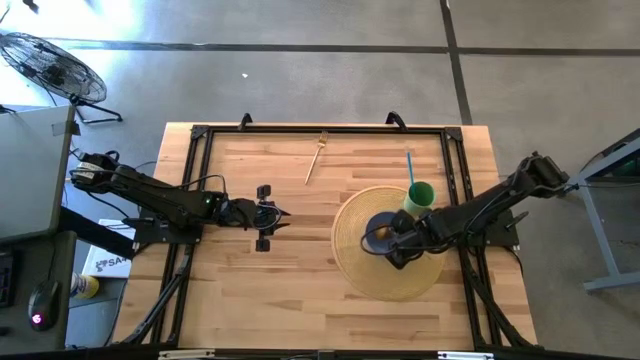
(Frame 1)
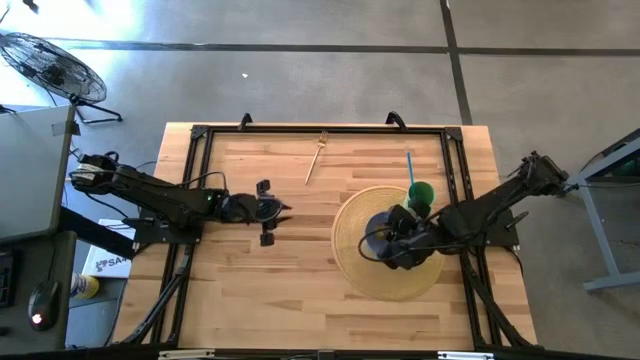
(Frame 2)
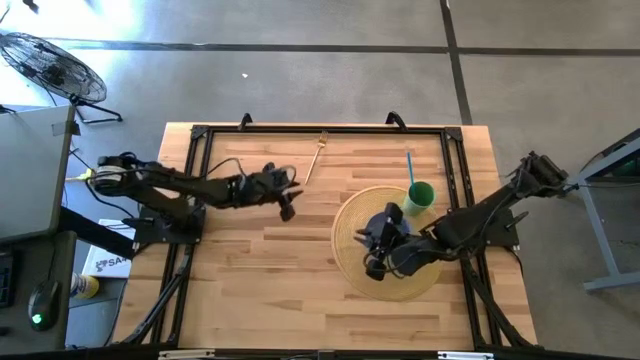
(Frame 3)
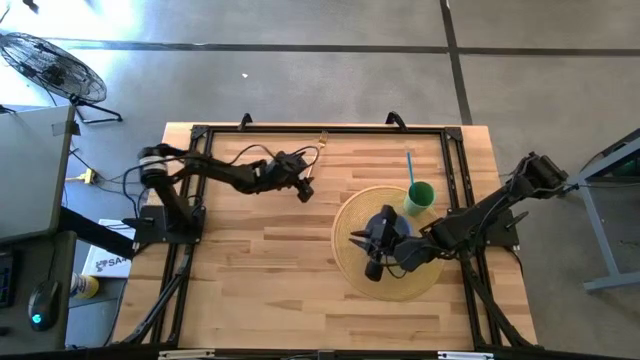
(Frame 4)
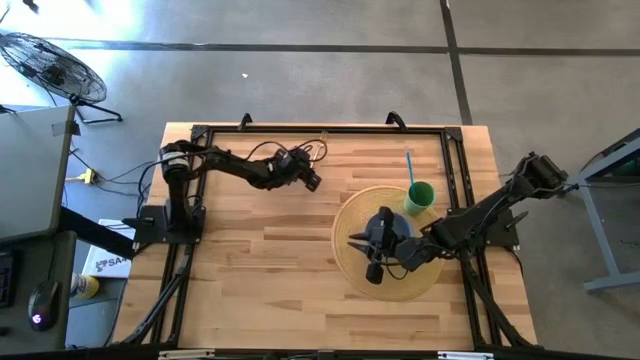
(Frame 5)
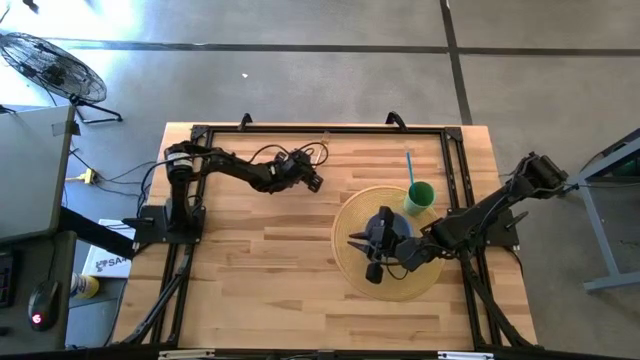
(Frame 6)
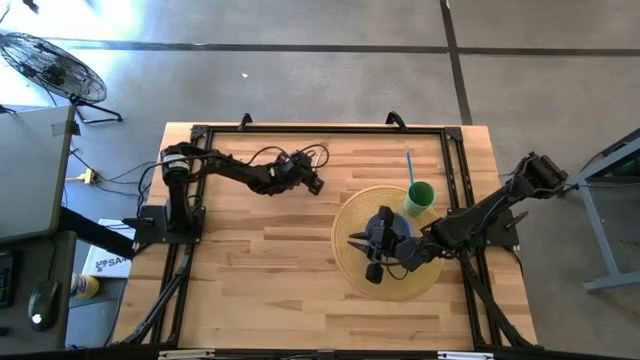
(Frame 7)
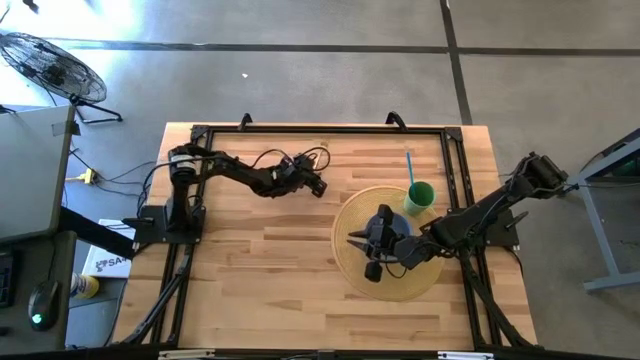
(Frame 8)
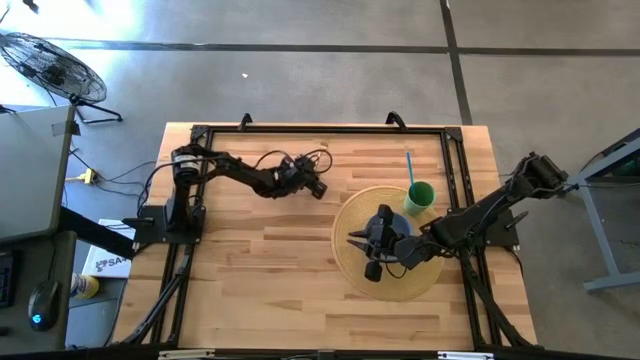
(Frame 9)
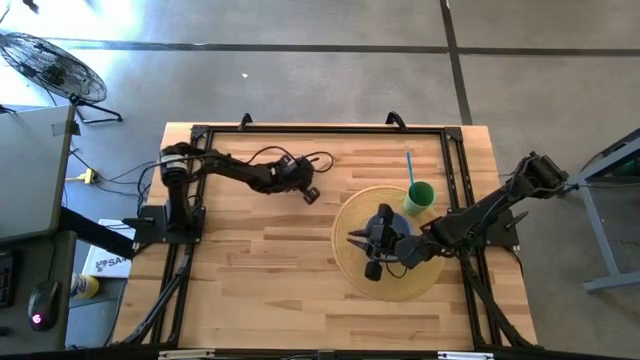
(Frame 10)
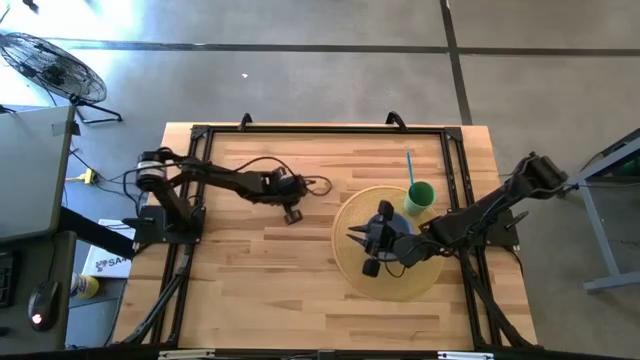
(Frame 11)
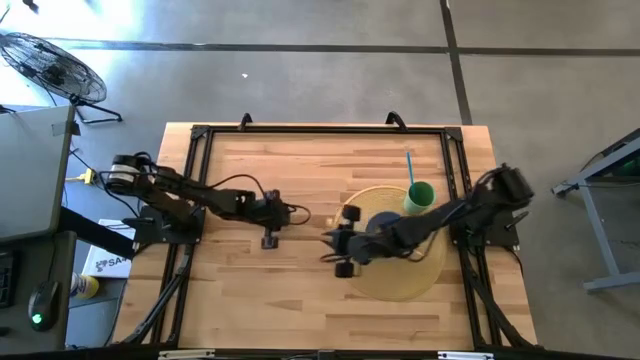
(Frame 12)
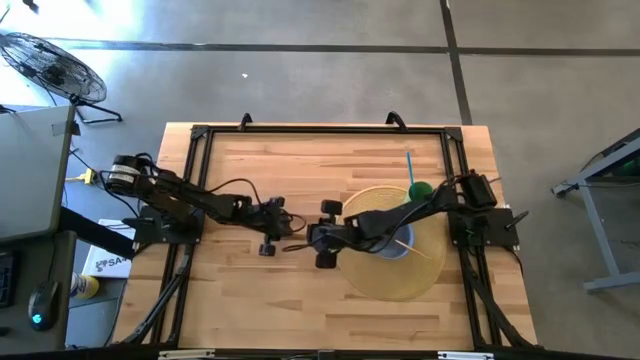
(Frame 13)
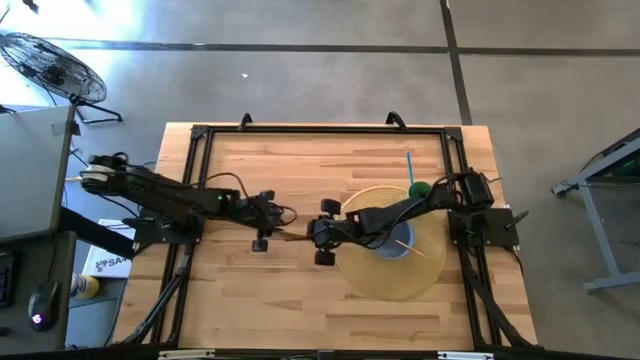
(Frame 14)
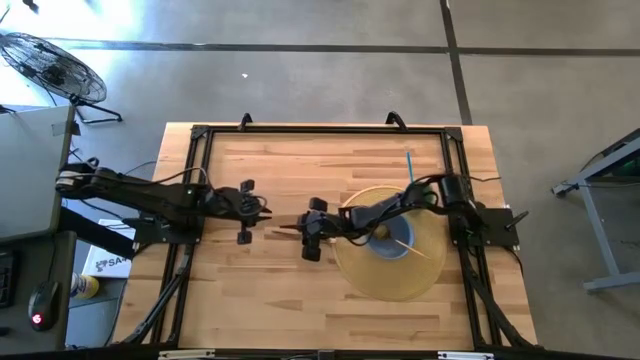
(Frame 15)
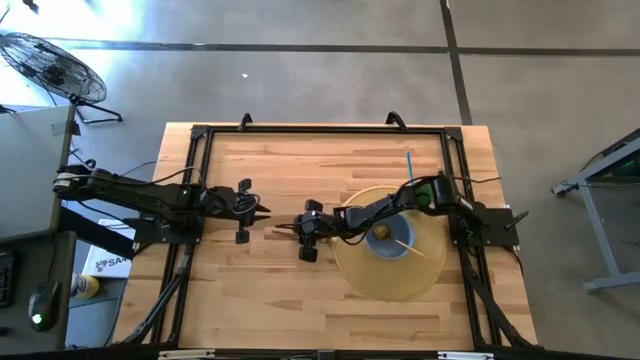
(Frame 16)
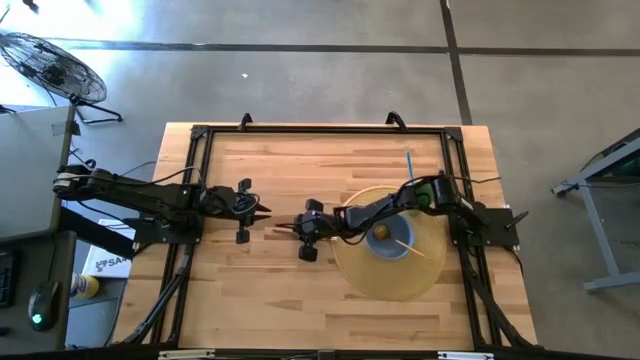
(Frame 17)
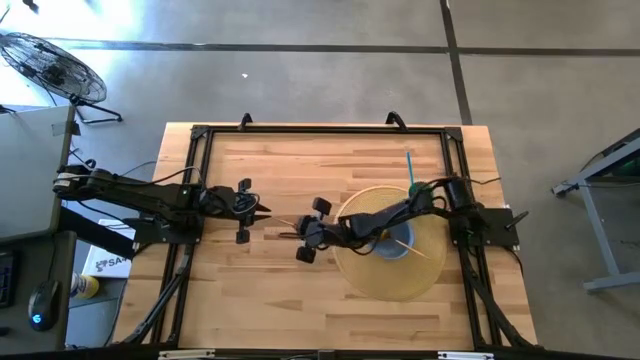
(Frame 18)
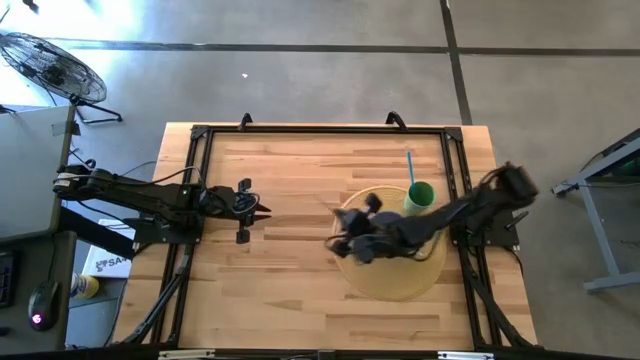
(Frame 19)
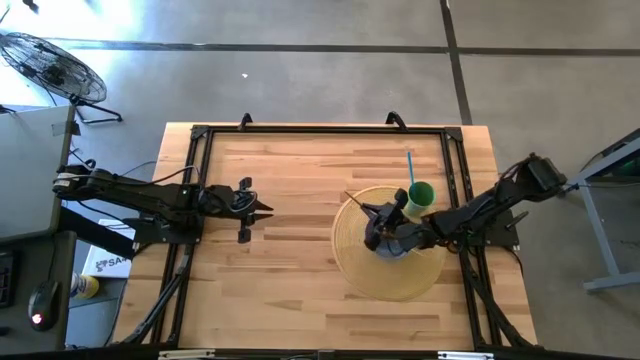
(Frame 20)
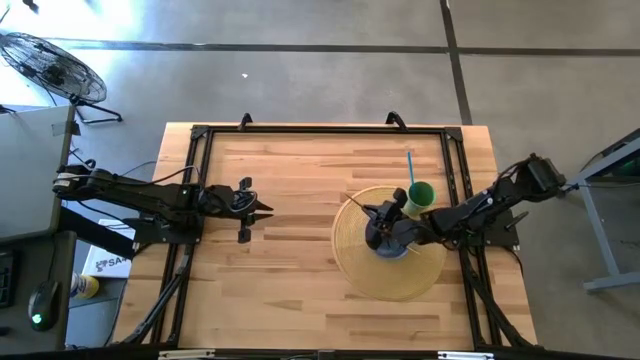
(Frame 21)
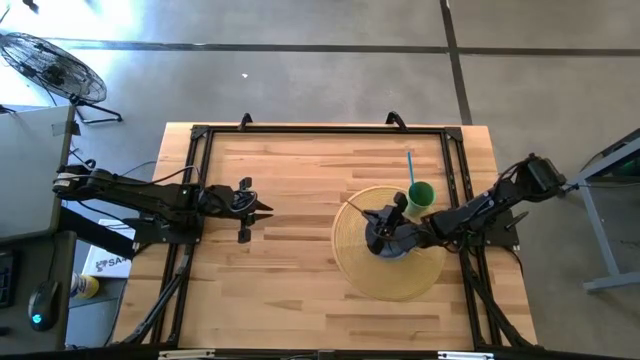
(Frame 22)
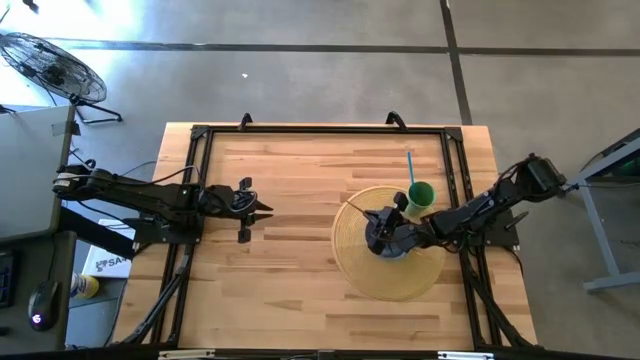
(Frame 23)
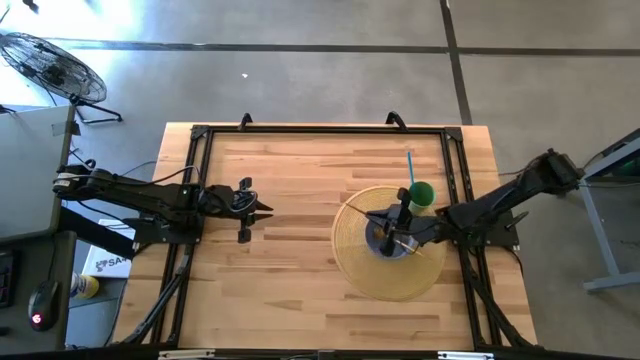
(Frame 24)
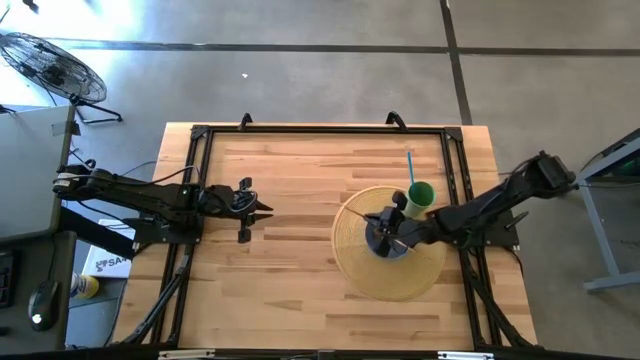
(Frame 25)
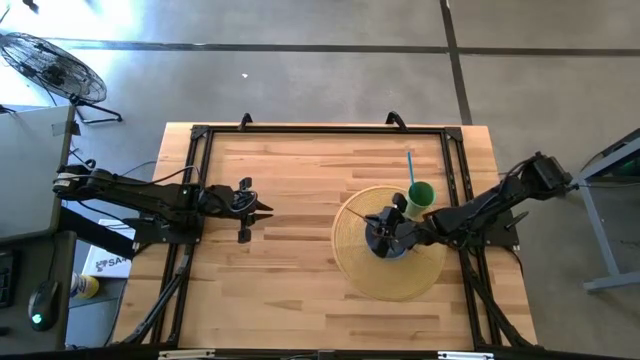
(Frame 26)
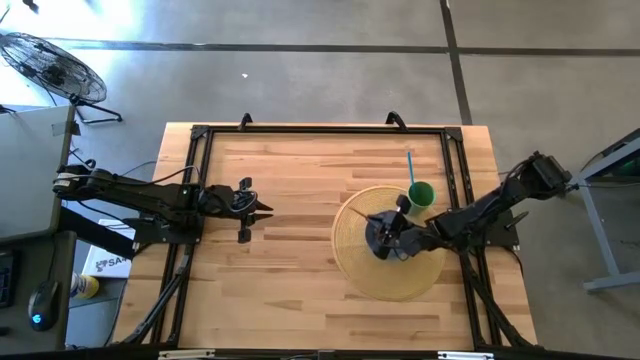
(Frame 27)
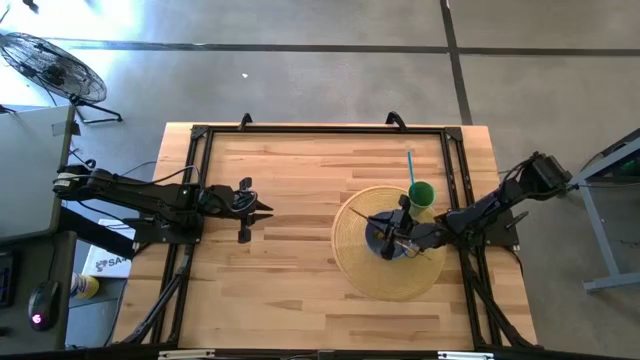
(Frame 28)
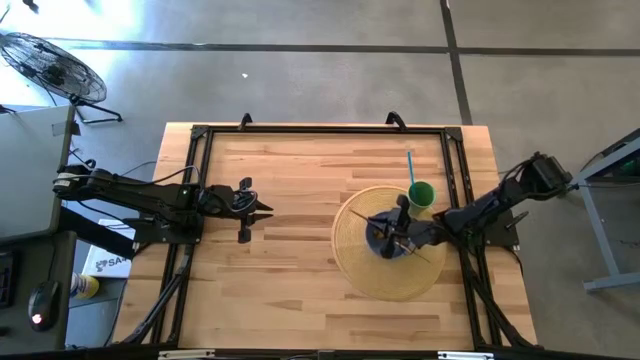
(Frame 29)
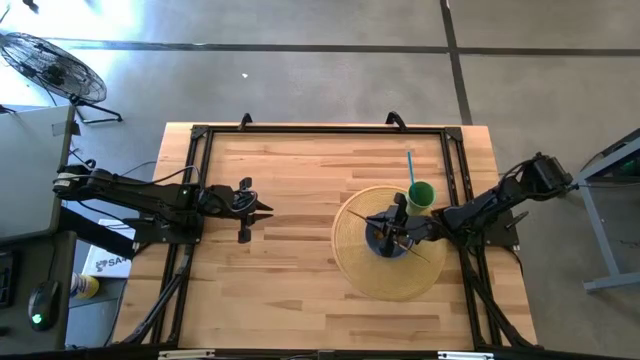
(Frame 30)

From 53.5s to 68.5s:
Task: Pick & Place Utensil
Put the gold fork into the blue bowl

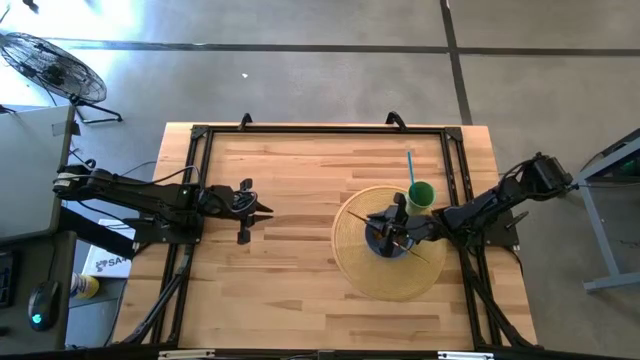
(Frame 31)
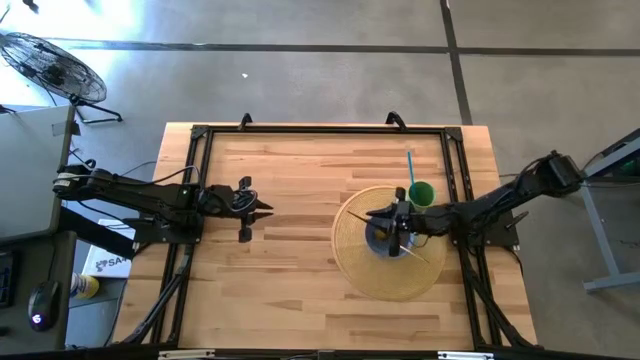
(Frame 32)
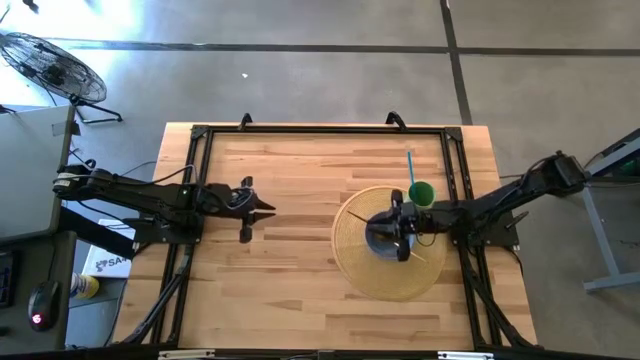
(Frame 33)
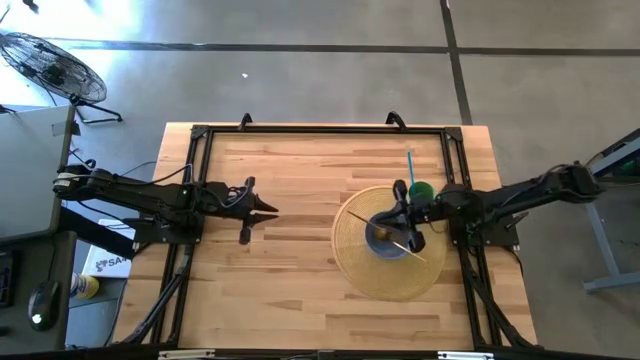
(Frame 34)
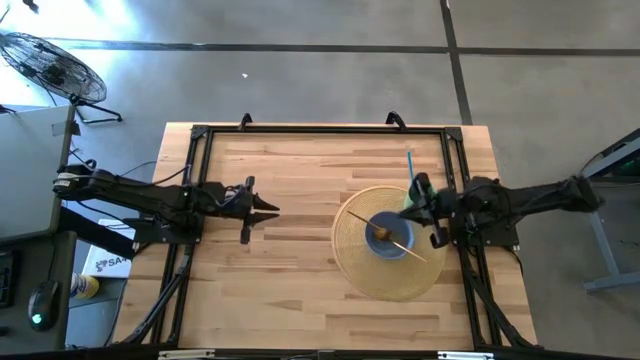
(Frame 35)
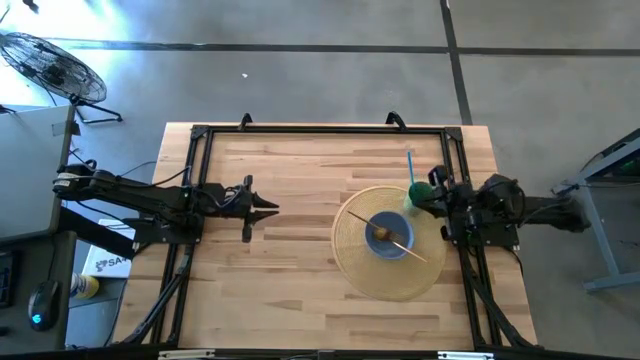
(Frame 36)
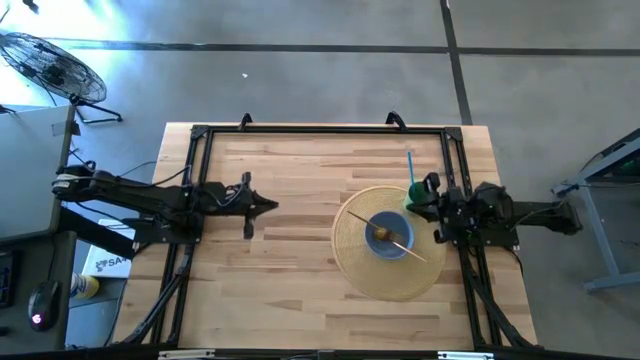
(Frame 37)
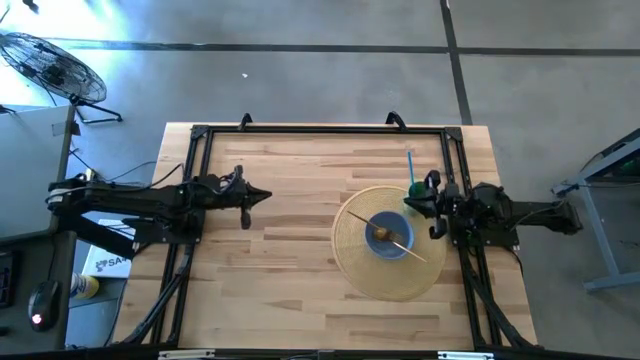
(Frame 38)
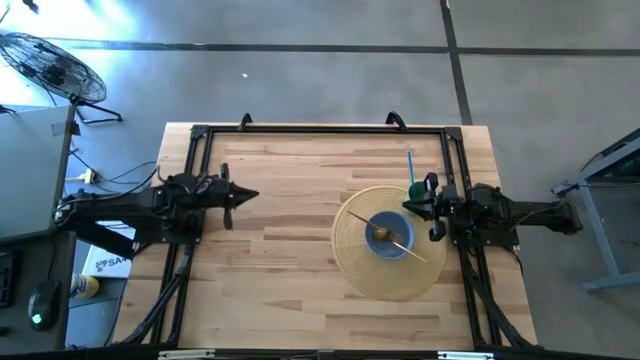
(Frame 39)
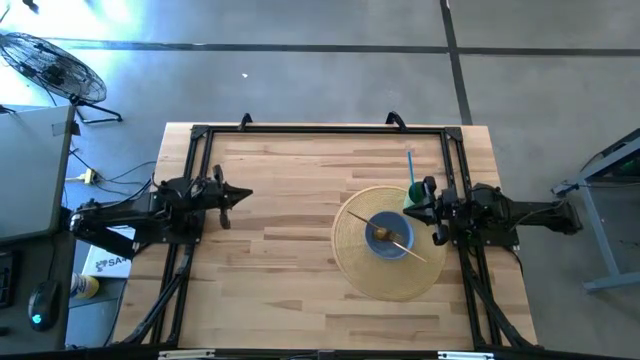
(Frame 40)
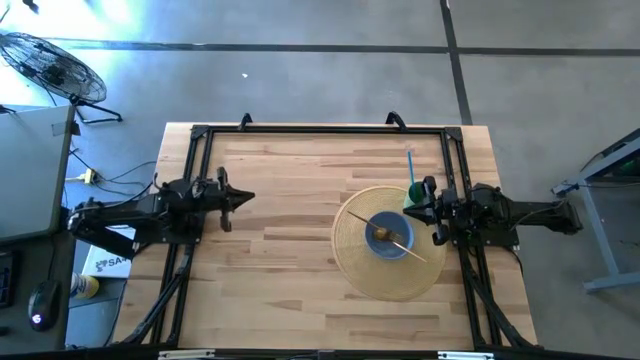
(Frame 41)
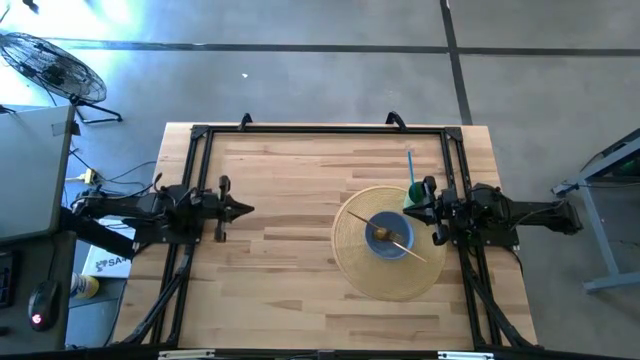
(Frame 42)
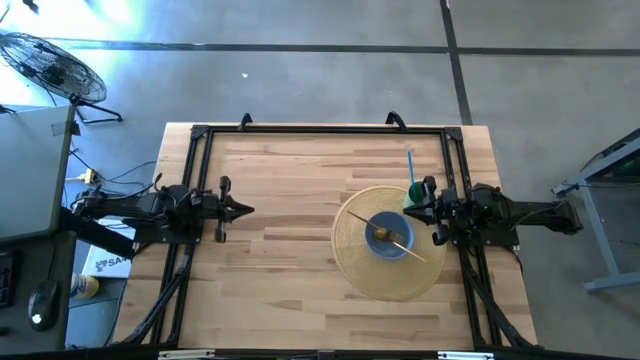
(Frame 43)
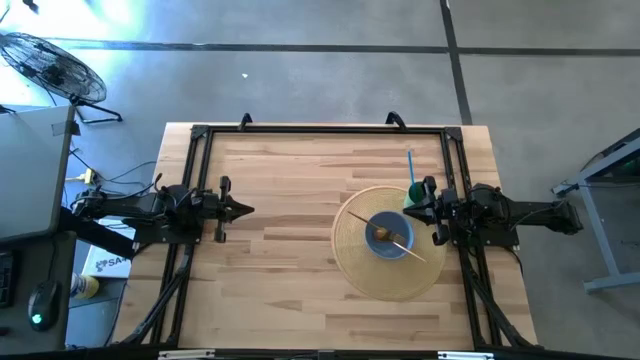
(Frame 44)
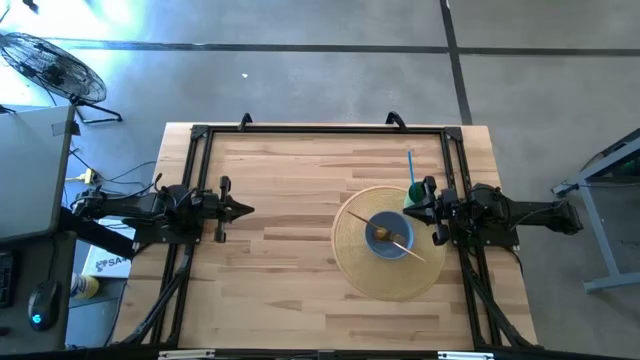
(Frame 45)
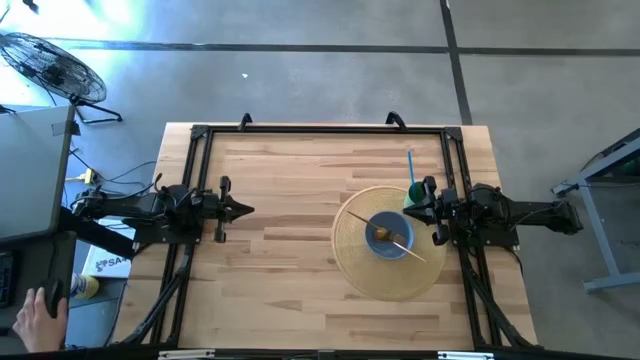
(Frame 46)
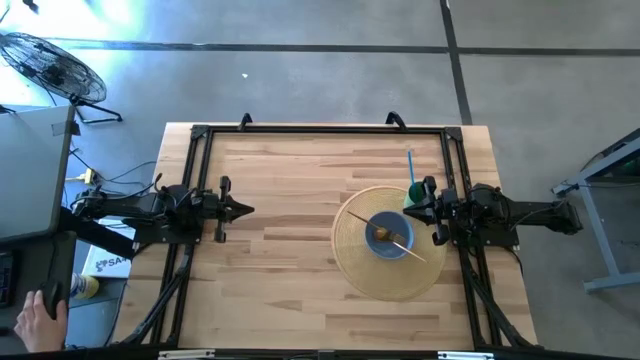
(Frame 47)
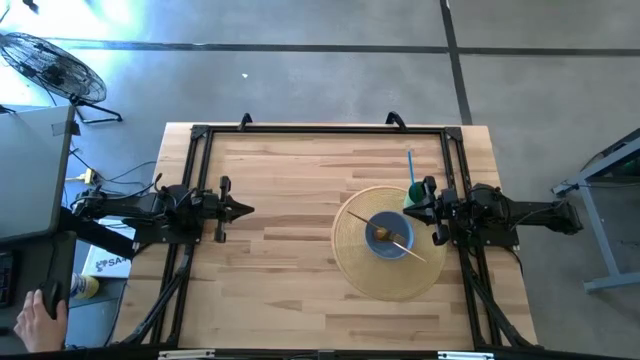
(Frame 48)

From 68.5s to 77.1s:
Return to Home Position
